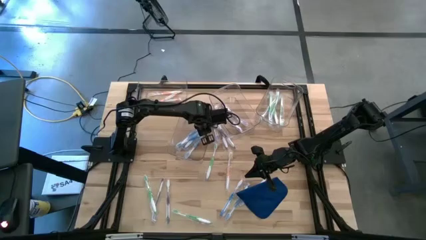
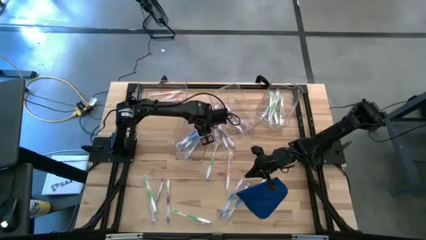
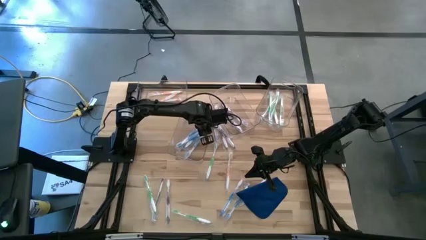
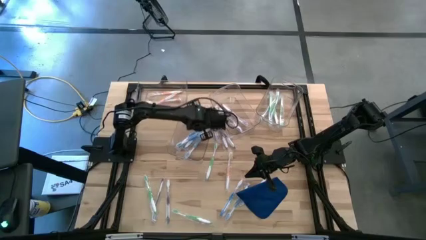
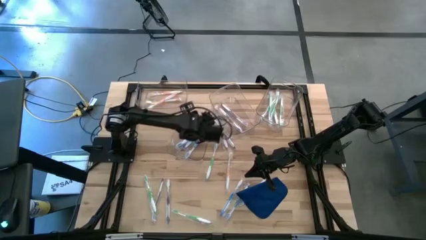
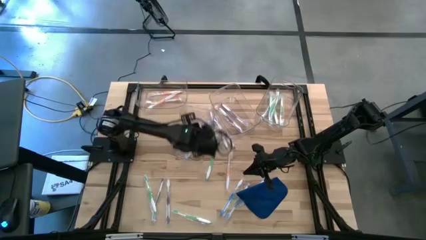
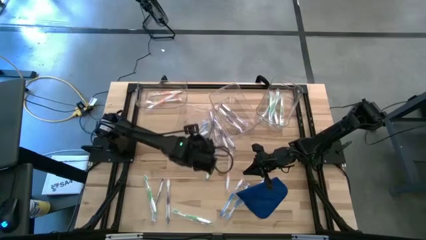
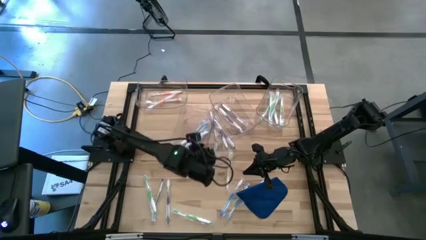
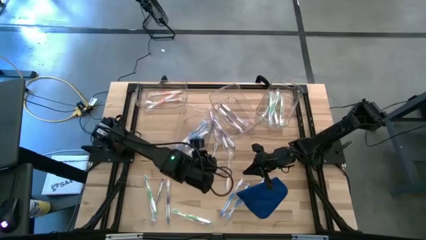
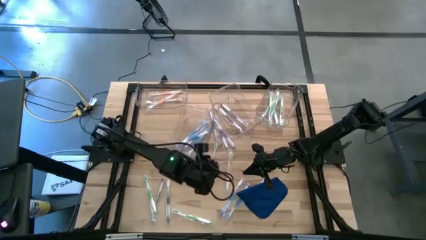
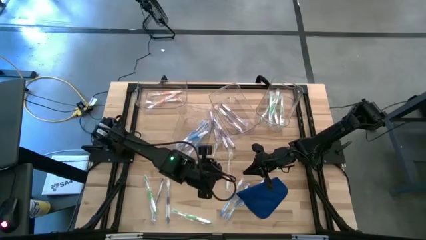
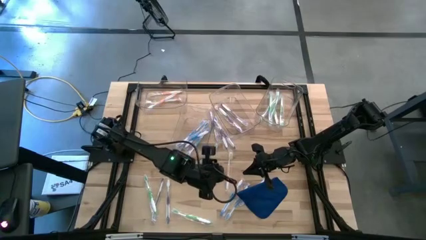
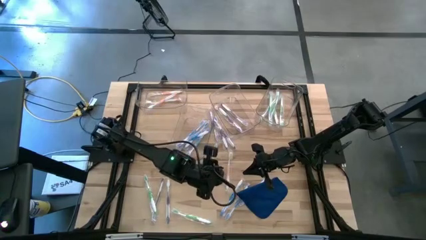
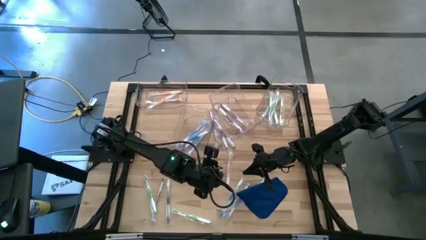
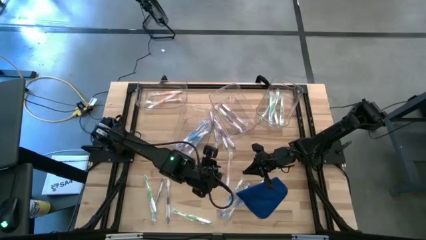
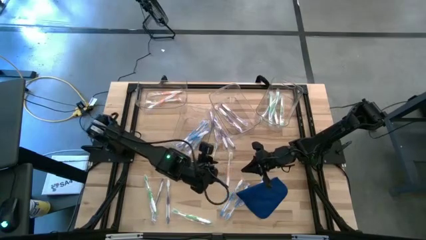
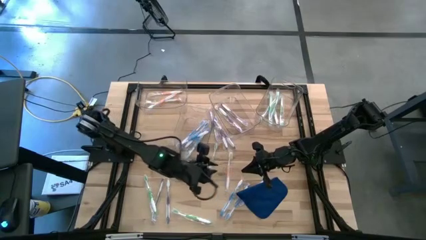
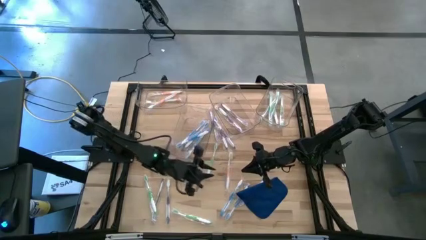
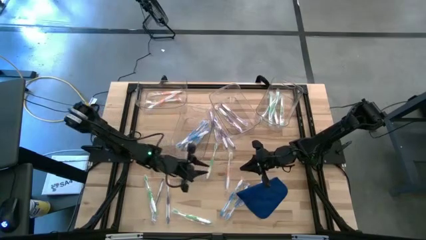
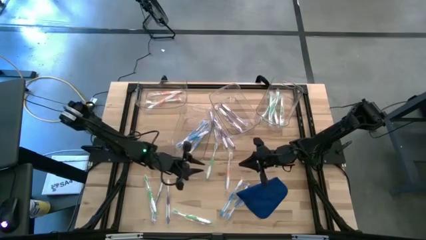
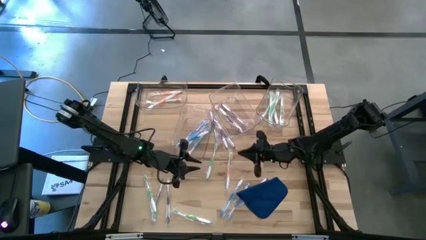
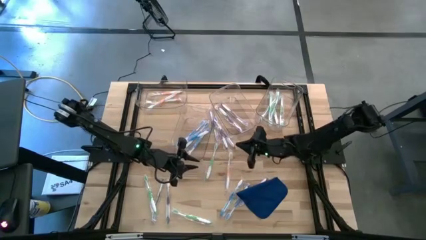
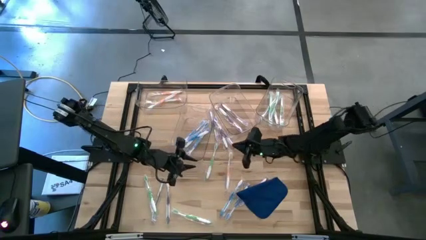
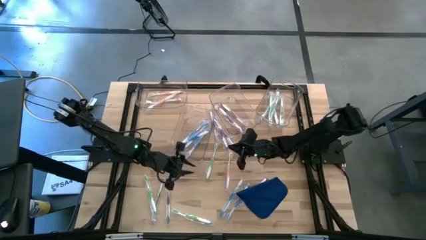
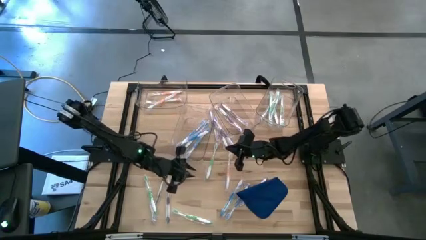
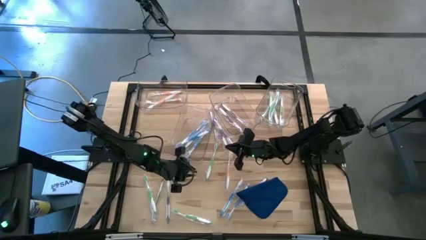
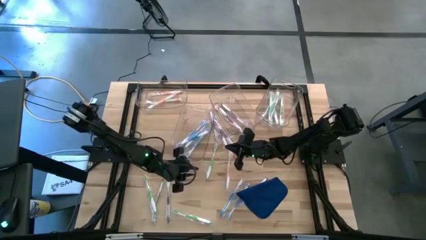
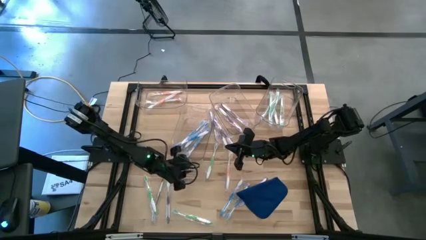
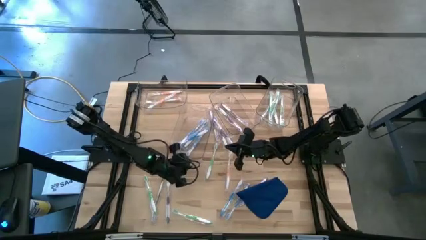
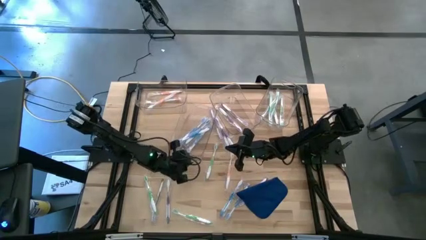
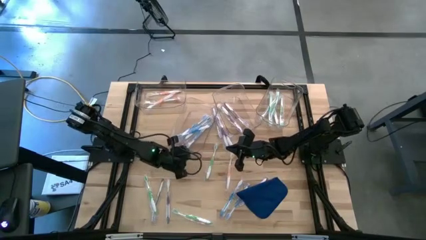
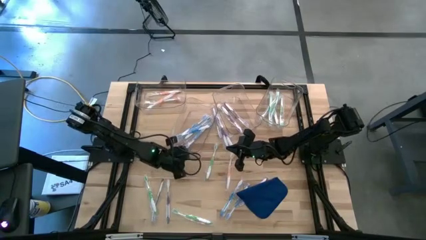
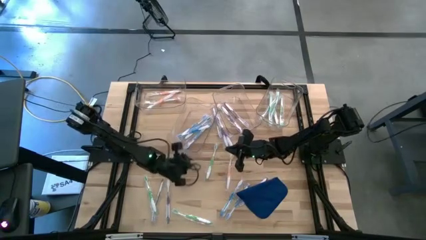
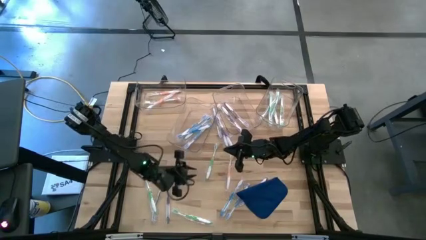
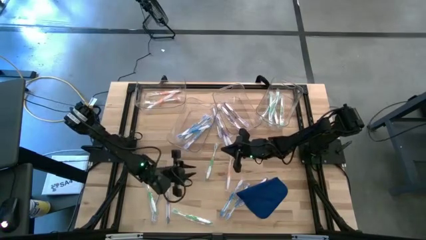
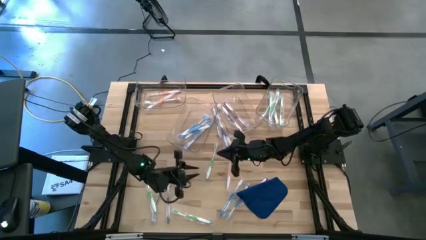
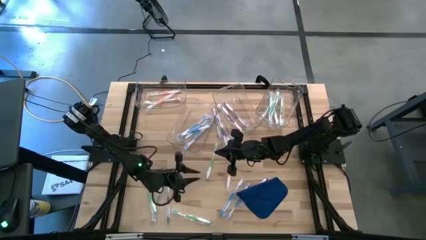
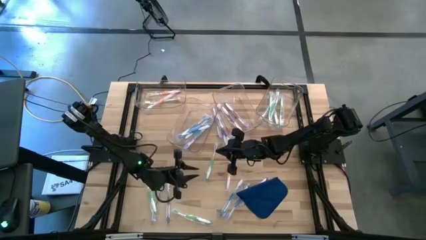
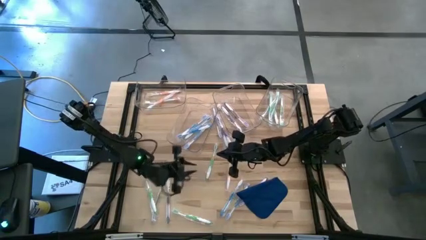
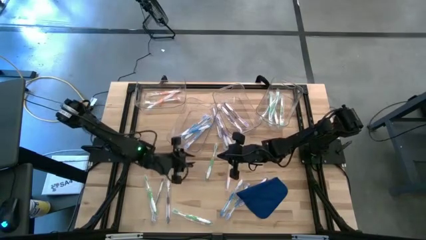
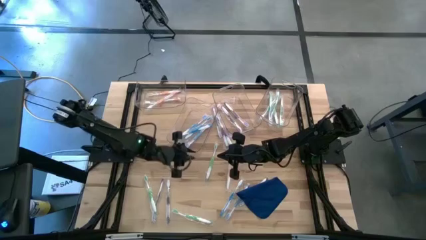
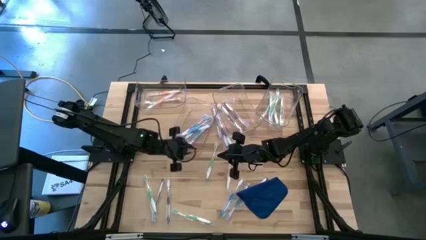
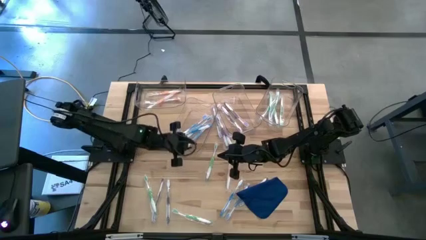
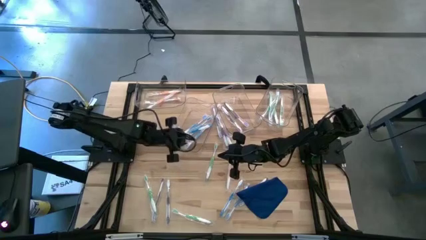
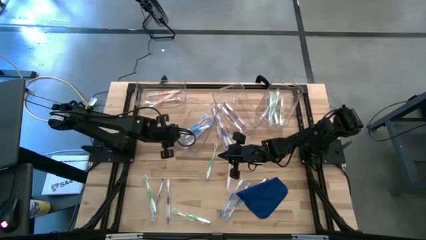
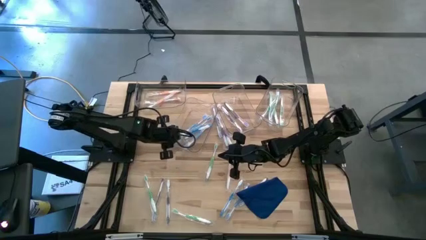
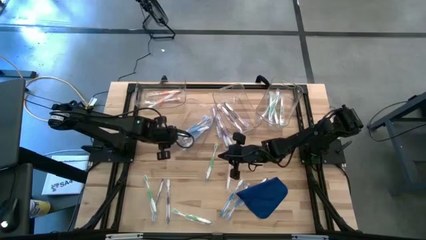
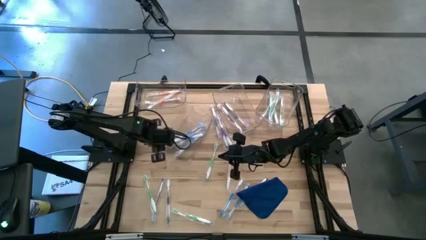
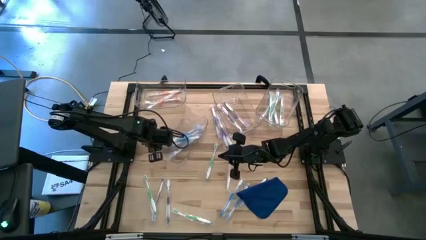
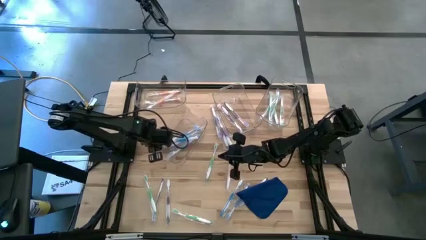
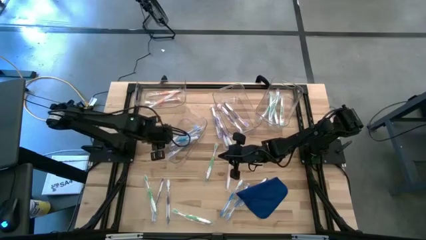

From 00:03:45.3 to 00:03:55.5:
Task: Pick & Place Toothbrushes
Adjust the bottom transparent bin from the table
